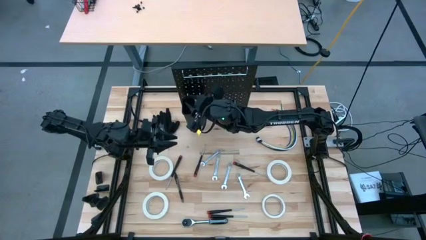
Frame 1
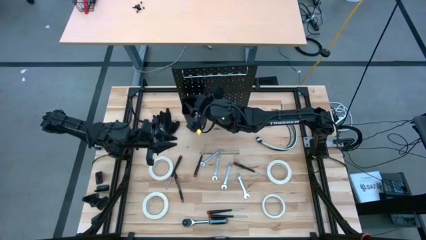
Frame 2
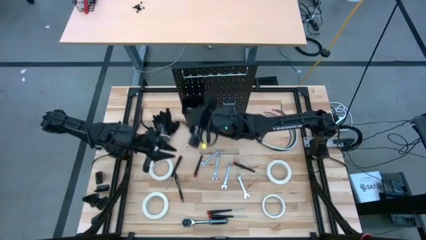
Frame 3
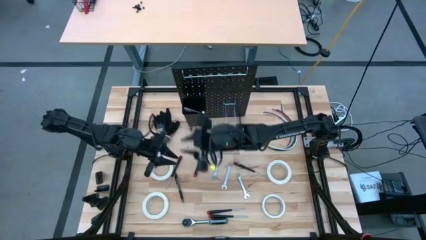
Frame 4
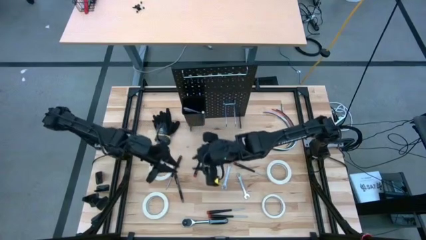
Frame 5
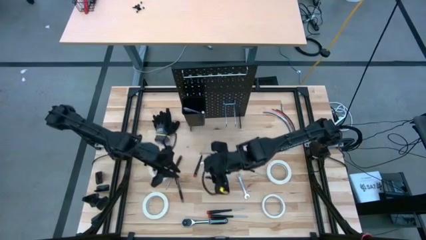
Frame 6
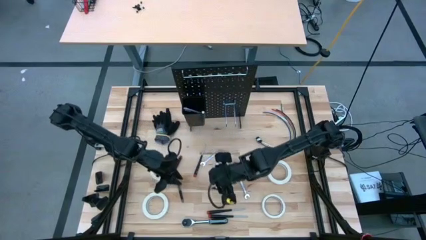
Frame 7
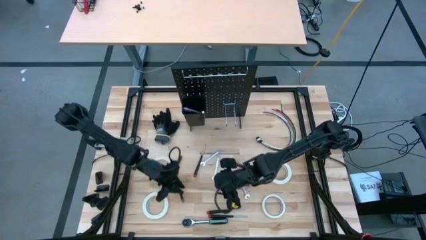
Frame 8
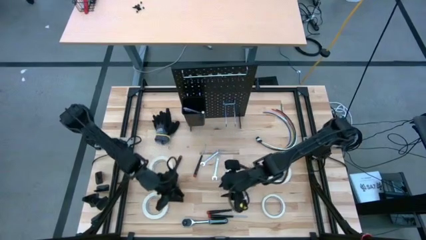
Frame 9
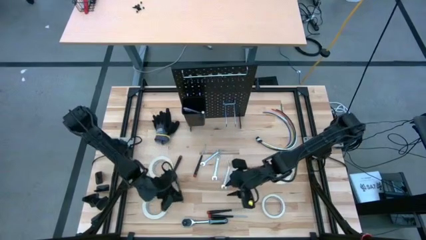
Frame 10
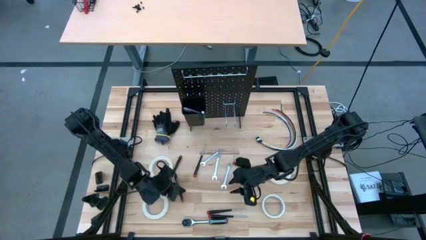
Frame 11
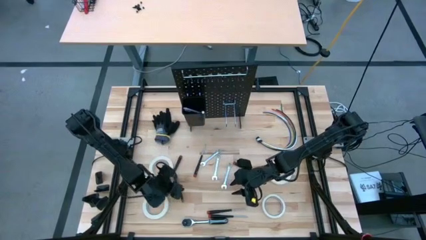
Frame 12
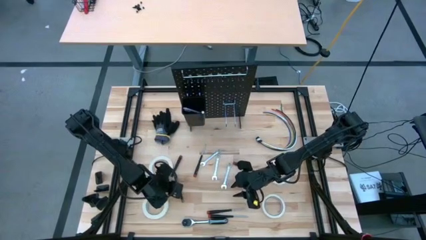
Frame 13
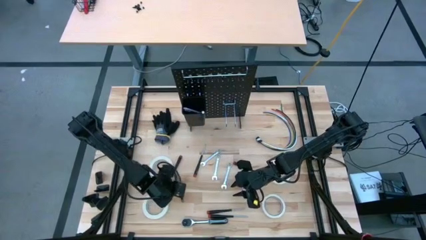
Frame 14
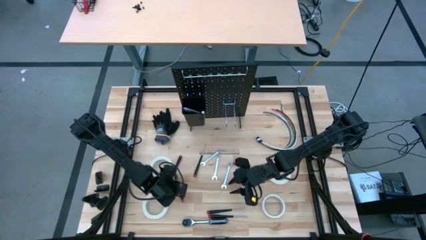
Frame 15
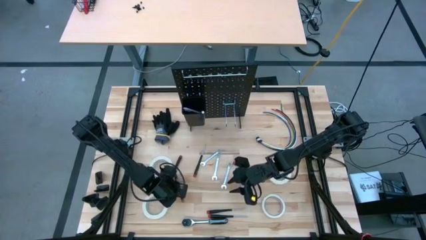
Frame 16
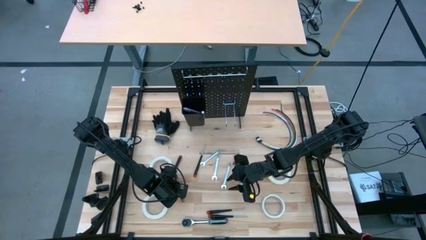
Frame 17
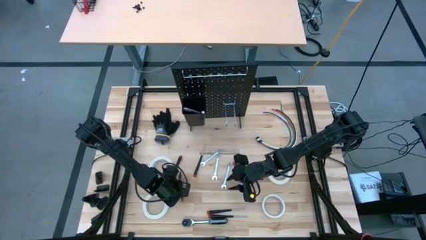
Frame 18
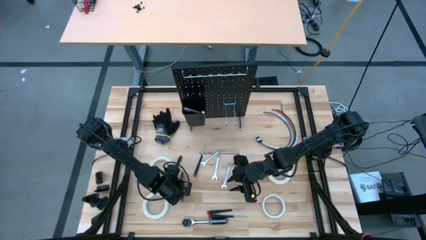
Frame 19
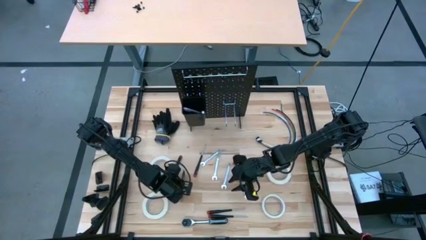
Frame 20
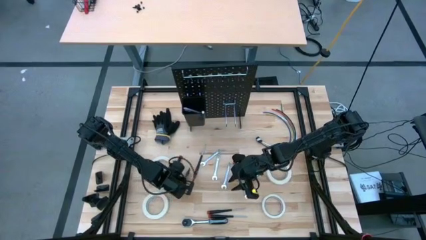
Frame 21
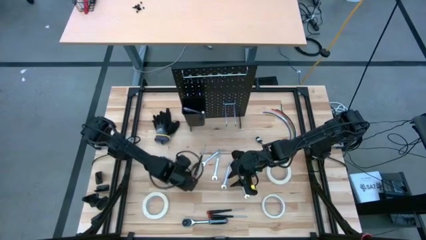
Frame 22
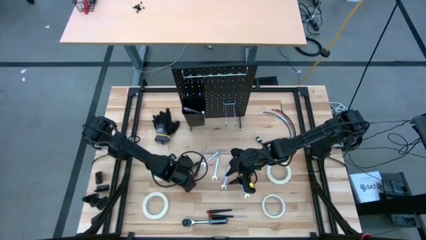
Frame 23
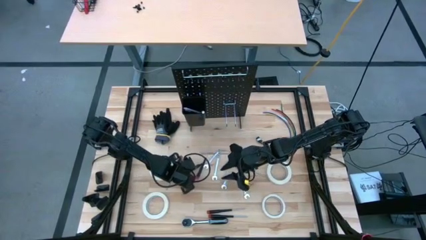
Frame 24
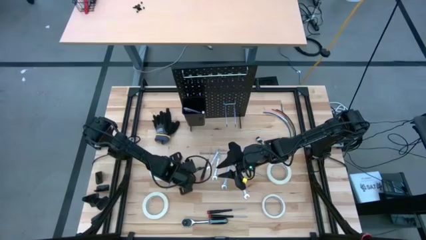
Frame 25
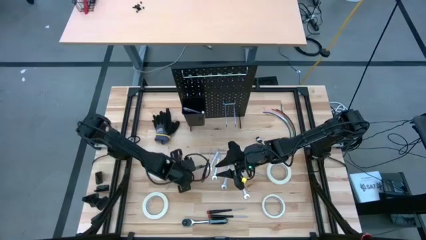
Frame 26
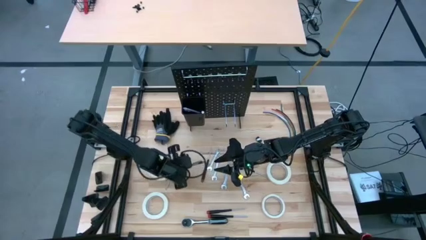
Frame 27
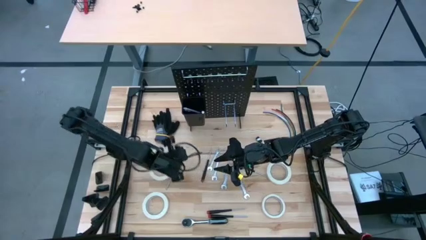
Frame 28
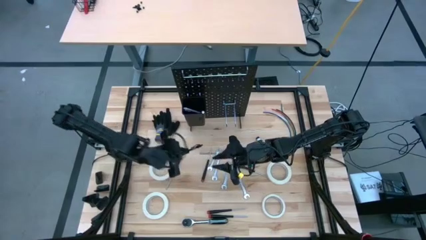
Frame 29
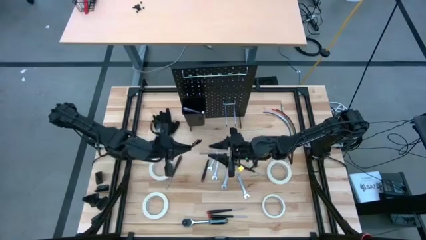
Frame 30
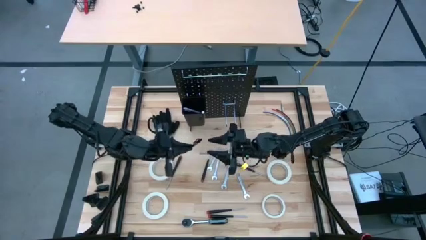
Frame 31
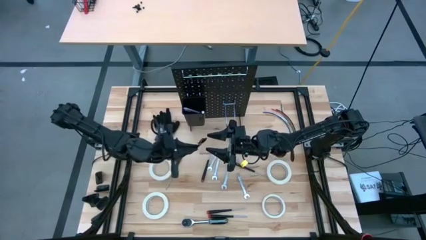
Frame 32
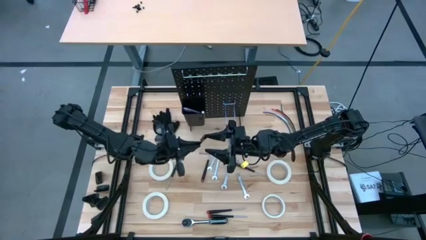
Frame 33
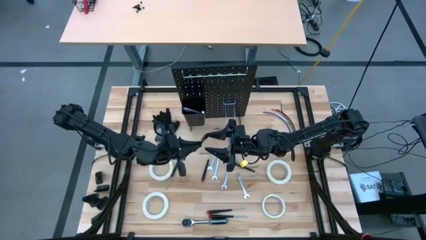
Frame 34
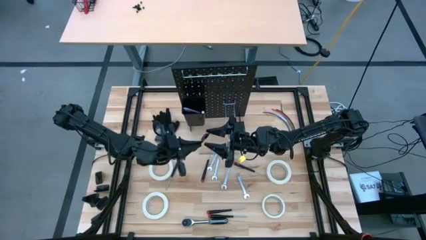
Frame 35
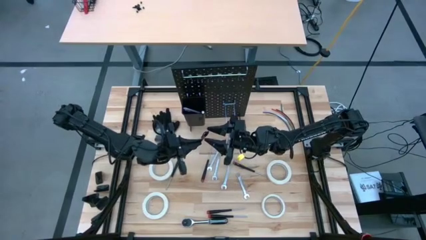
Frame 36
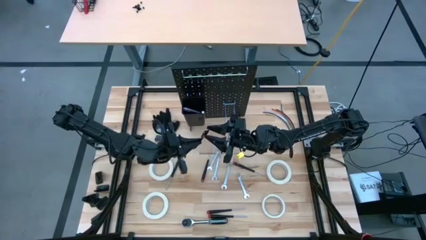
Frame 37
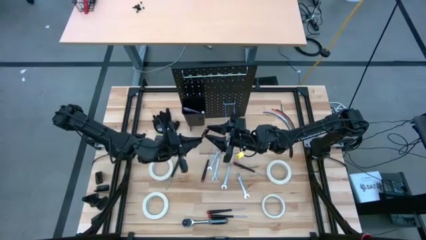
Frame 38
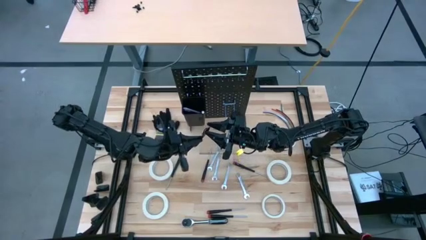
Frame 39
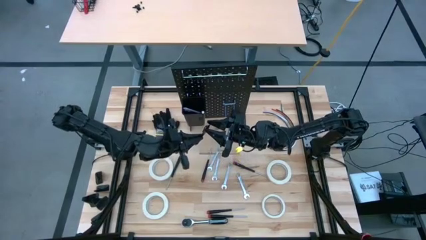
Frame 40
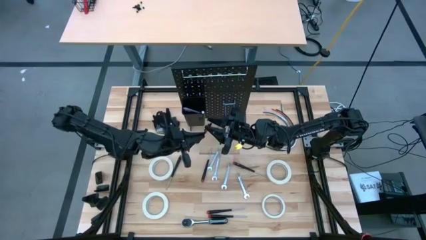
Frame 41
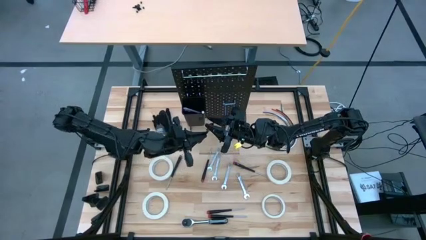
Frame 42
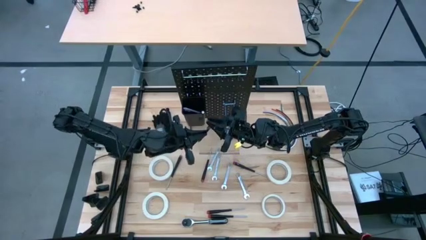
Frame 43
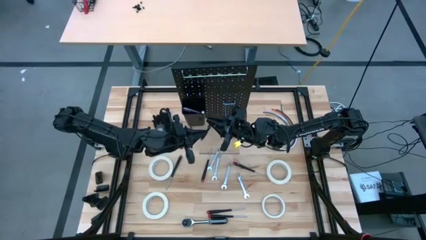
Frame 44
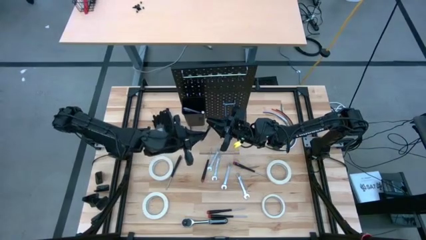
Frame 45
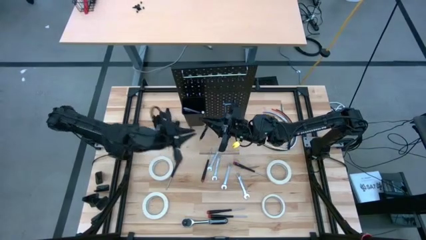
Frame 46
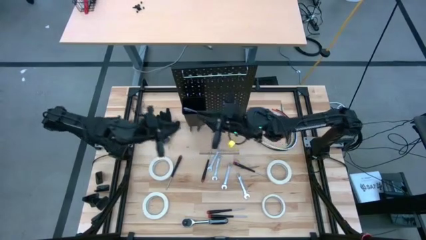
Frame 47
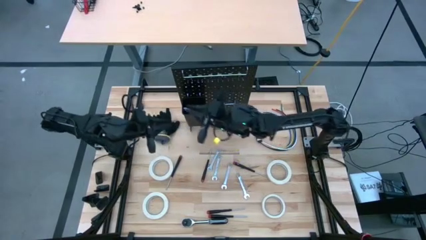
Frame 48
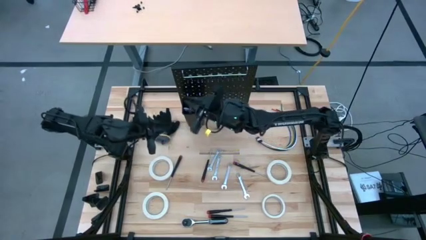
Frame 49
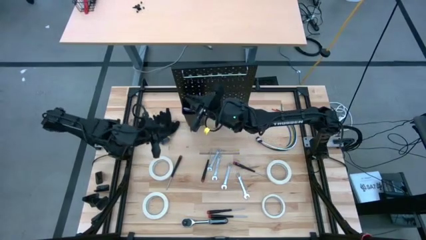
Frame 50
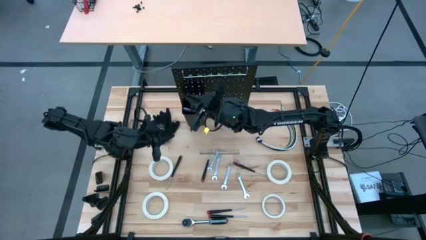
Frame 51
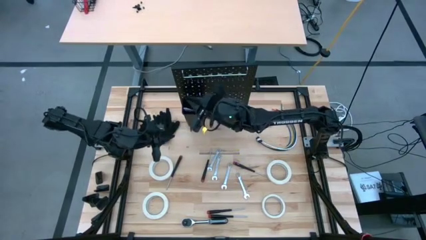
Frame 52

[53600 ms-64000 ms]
Task: Hang tools onto peg board
Put the black pen into the black bin on the peg board
